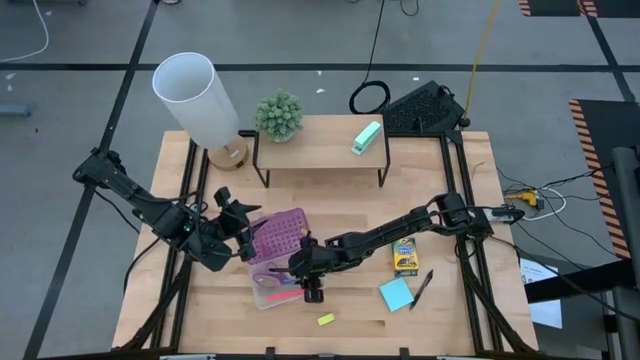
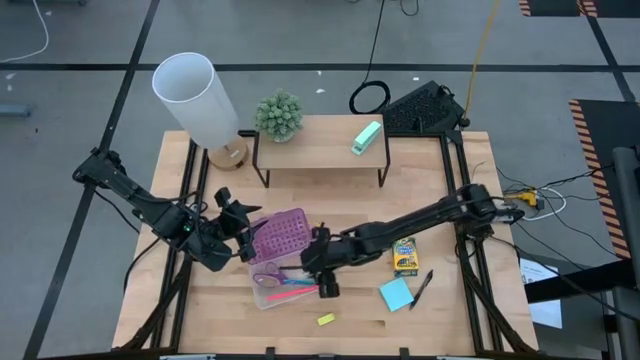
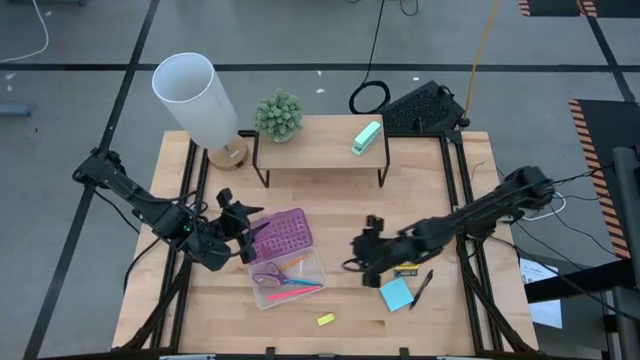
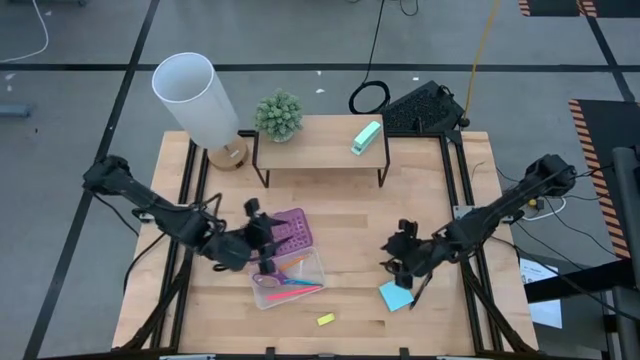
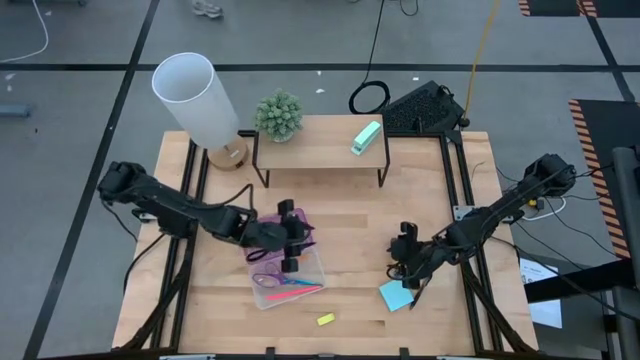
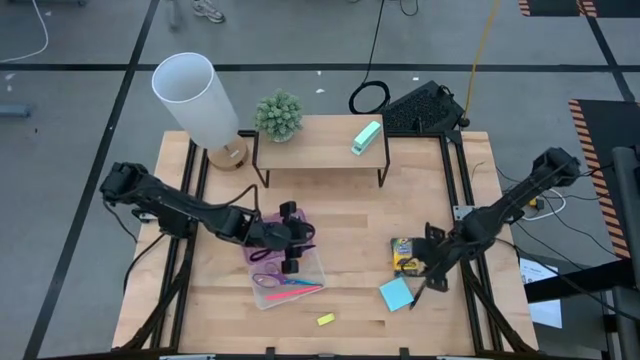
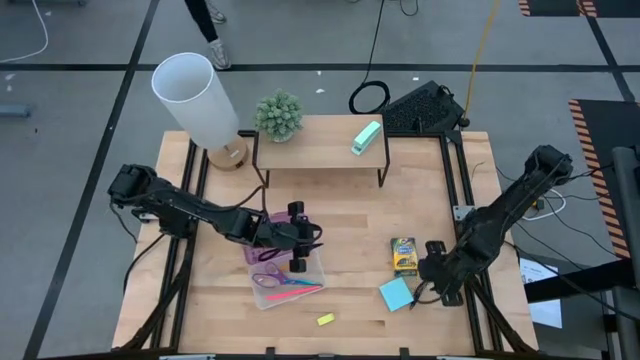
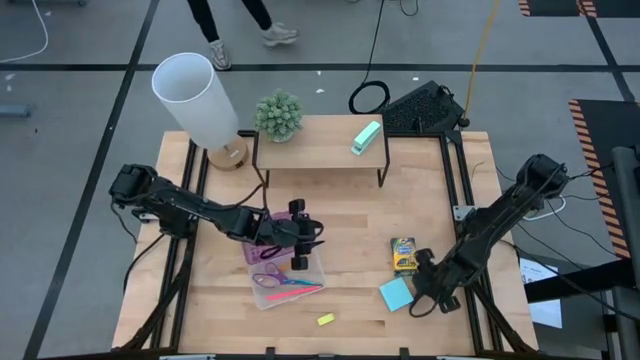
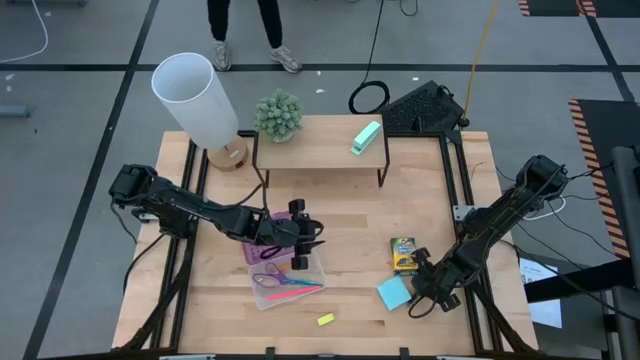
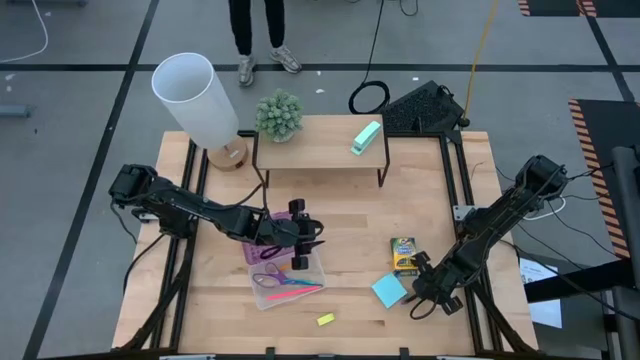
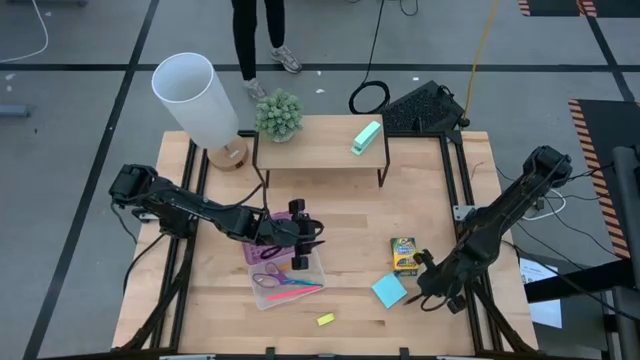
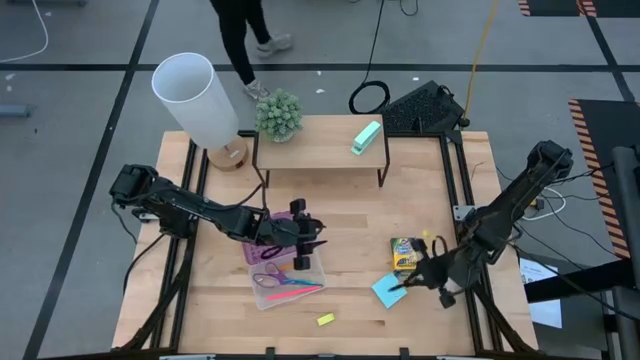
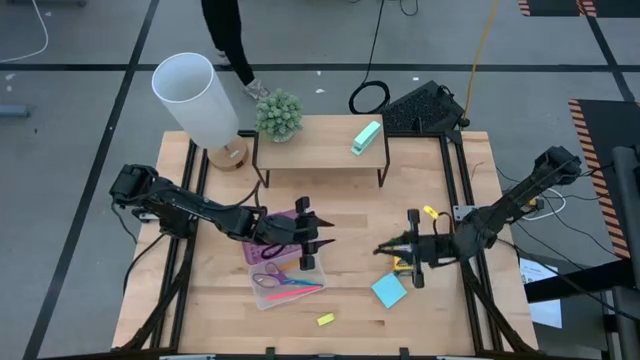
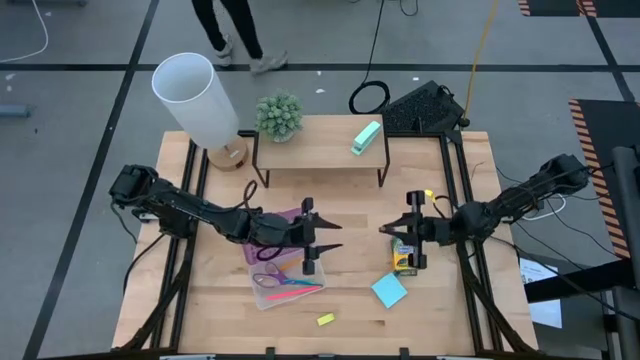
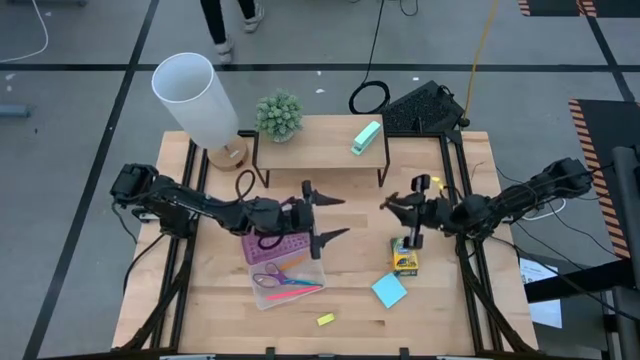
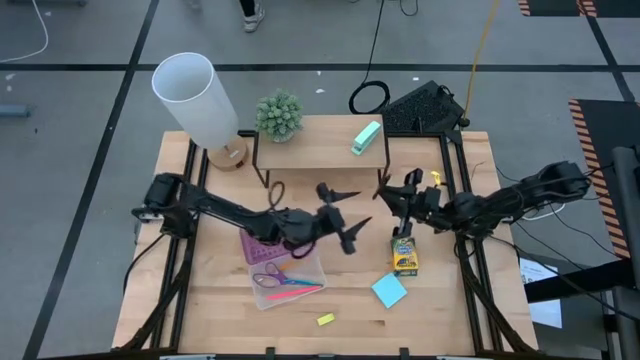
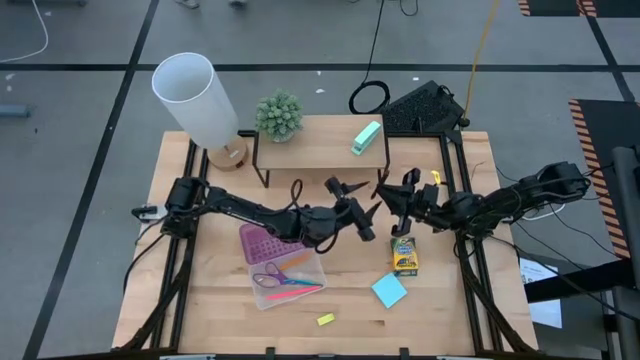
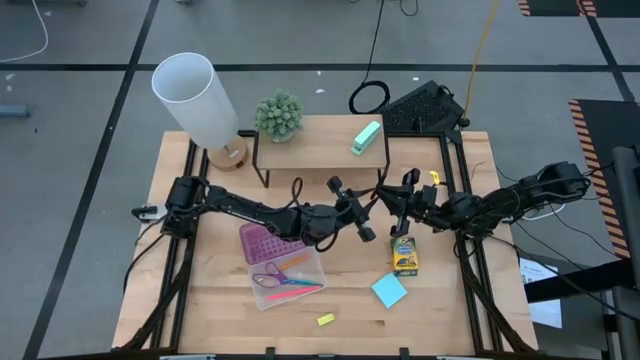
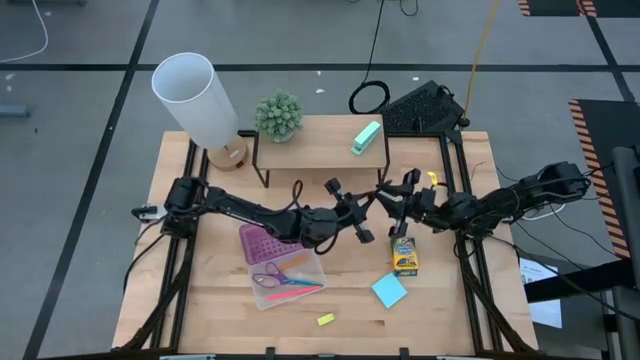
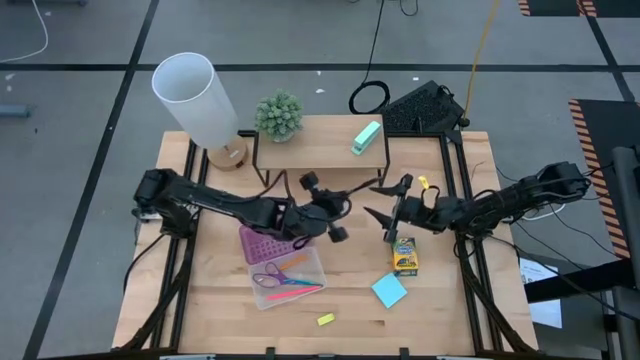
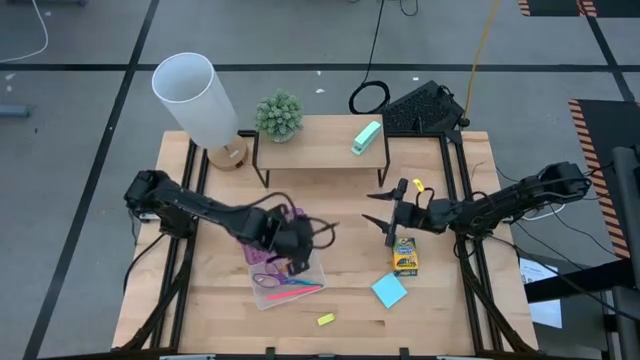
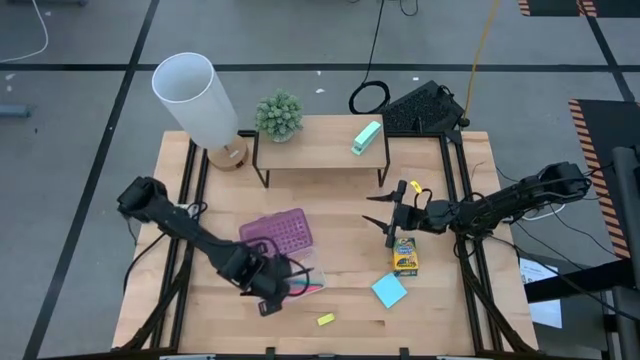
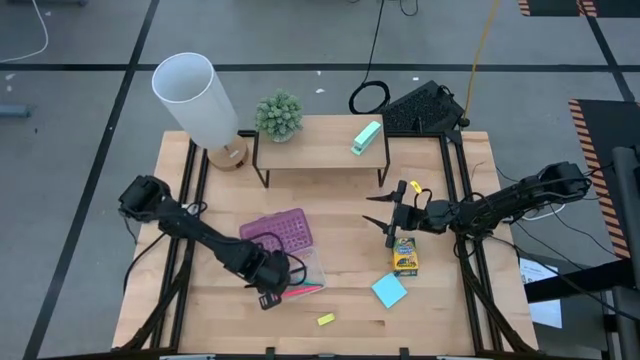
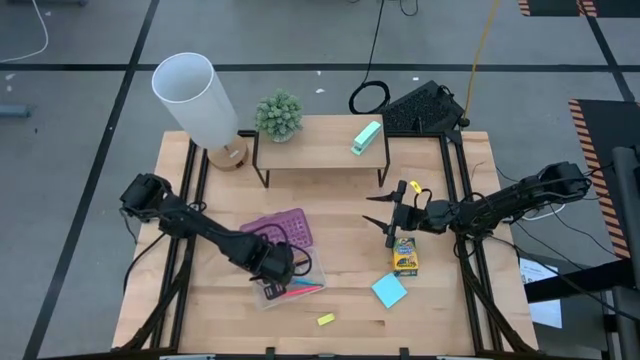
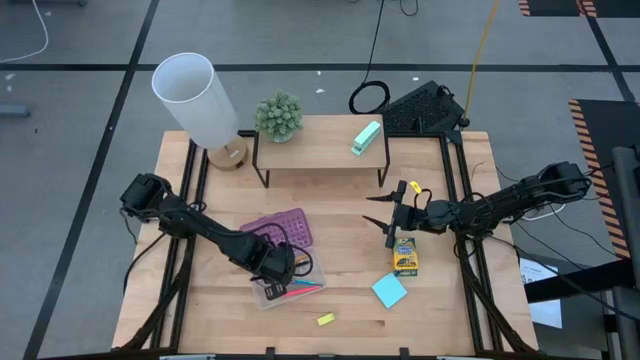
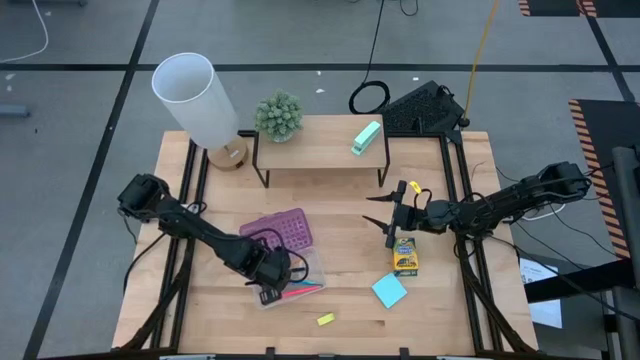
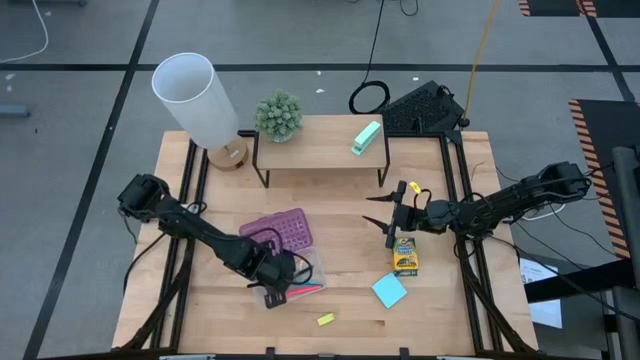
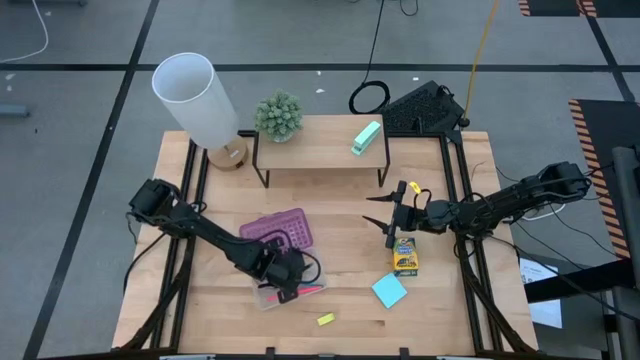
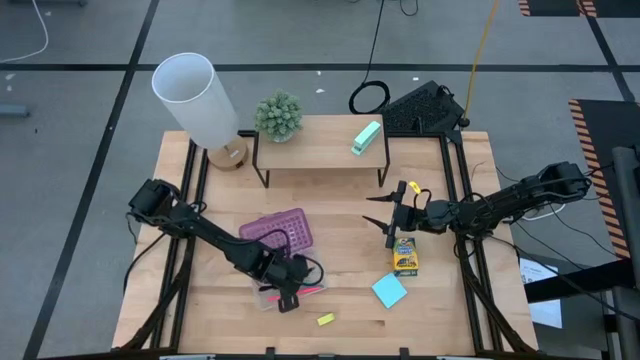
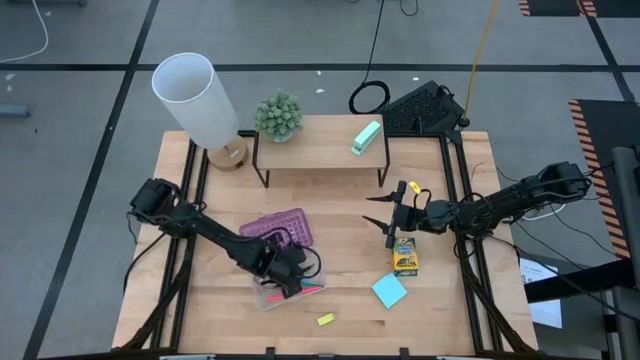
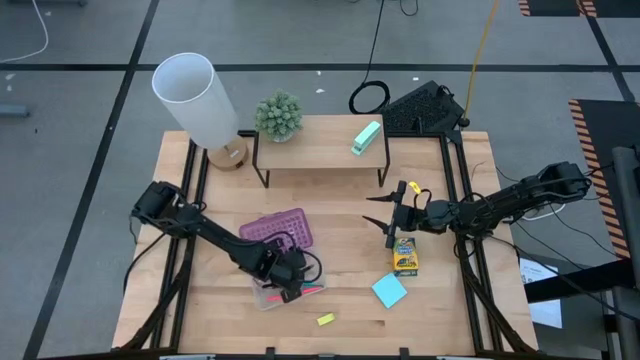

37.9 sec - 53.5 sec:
Task: Pack school essentials
Put the black pen into the transparent box

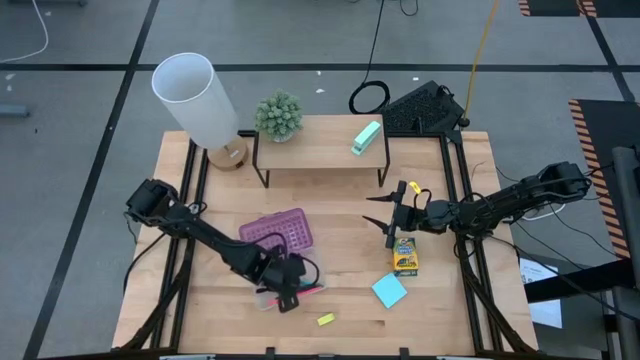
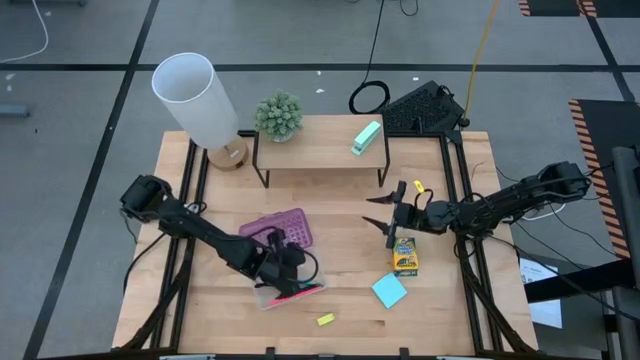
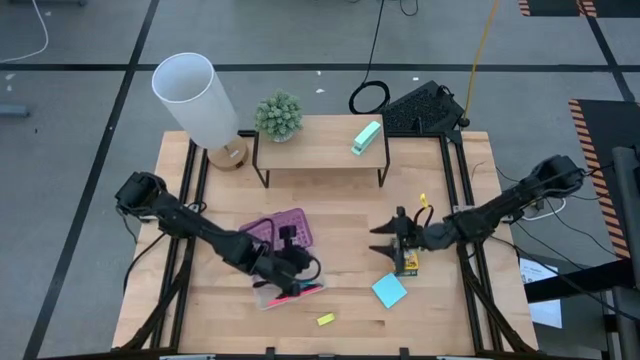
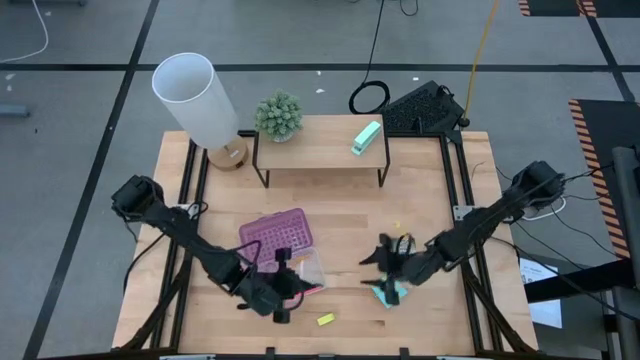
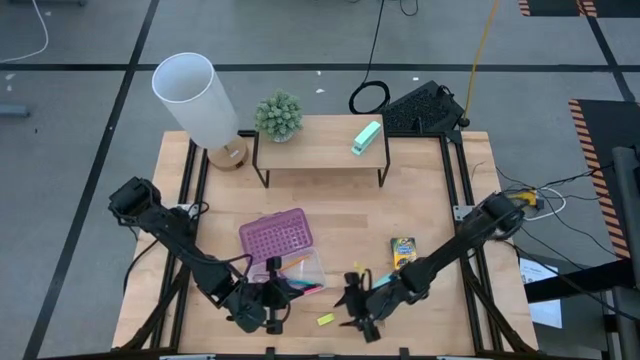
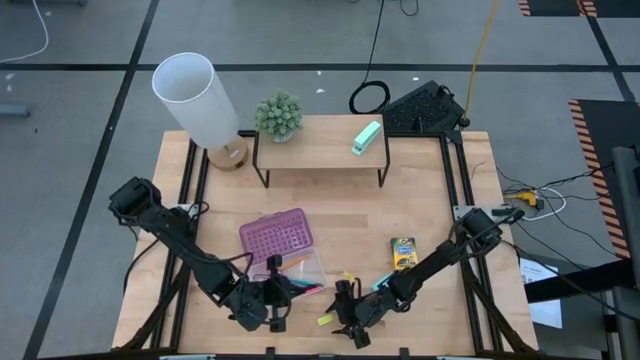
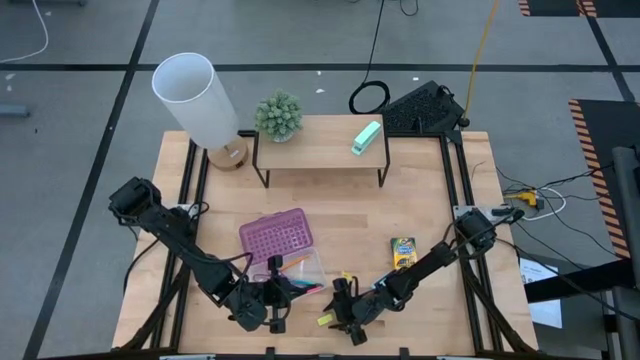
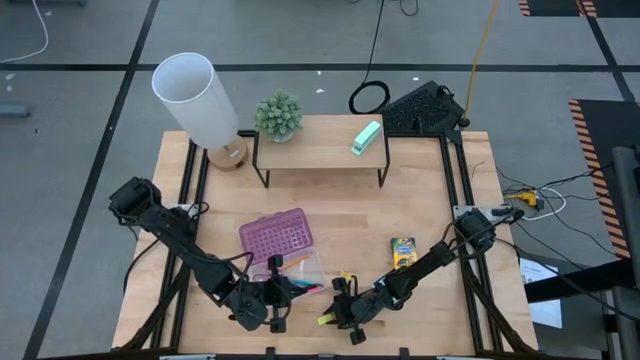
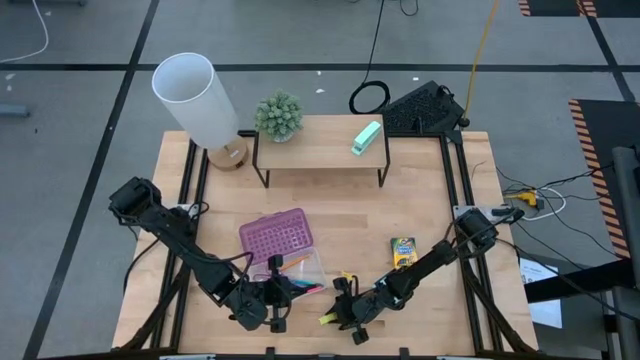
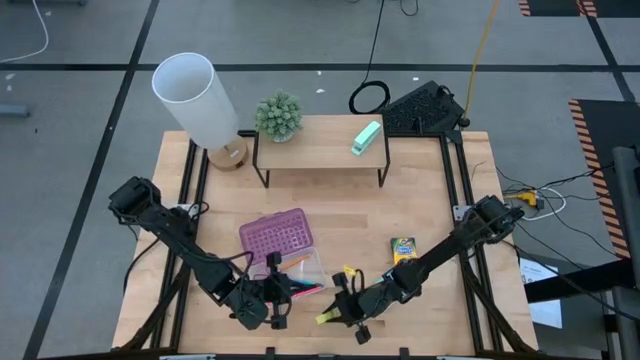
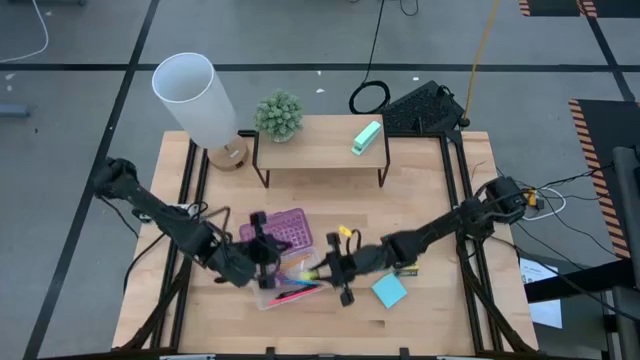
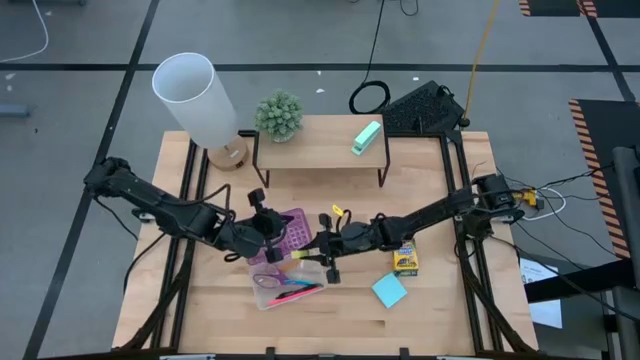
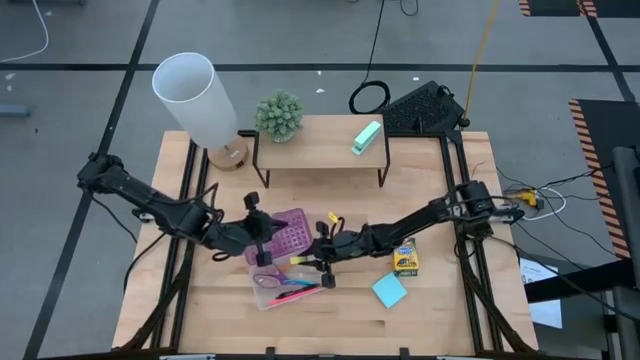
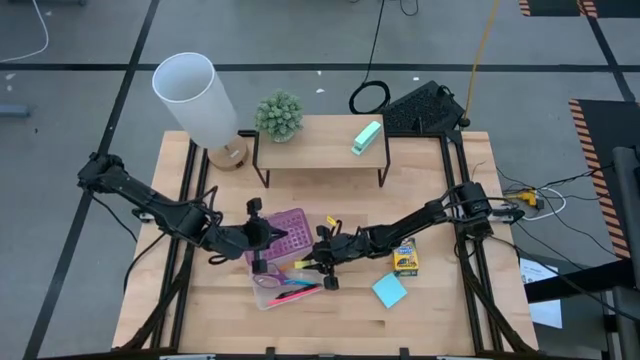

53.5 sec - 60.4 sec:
Put the yellow eraser into the transparent box
